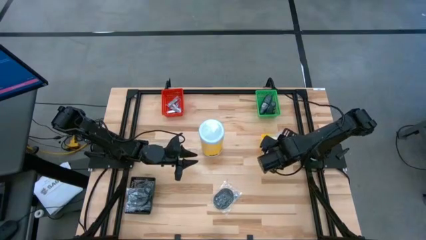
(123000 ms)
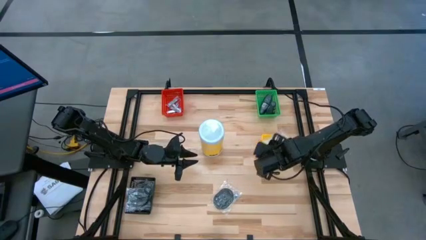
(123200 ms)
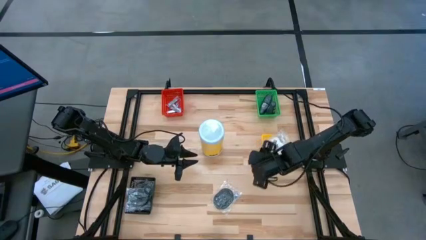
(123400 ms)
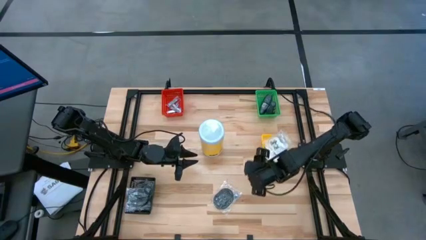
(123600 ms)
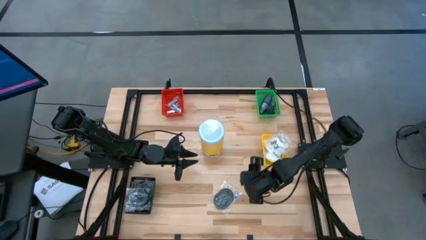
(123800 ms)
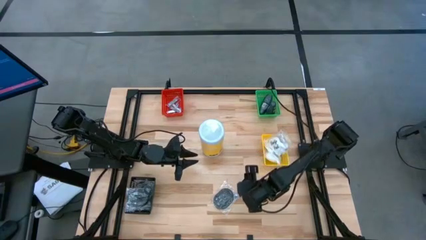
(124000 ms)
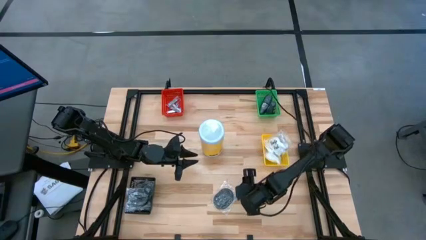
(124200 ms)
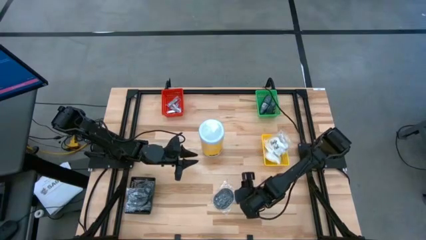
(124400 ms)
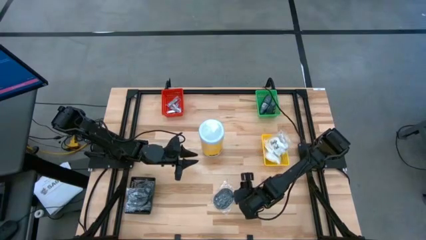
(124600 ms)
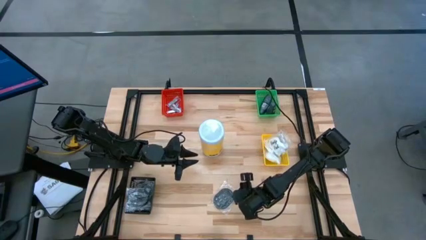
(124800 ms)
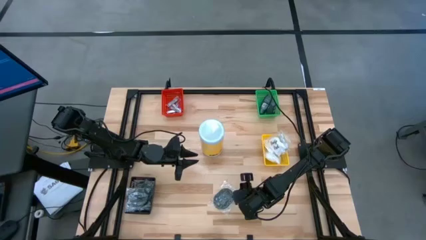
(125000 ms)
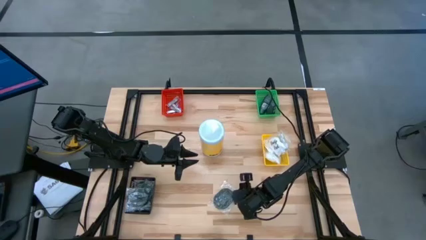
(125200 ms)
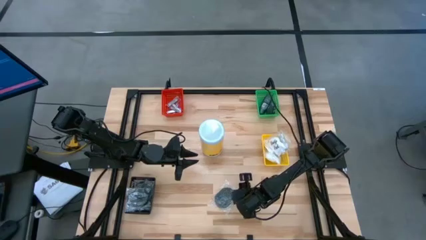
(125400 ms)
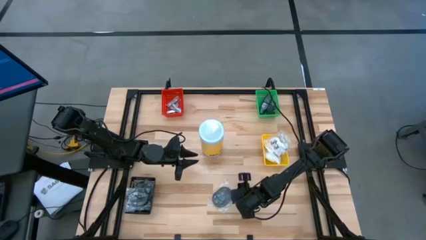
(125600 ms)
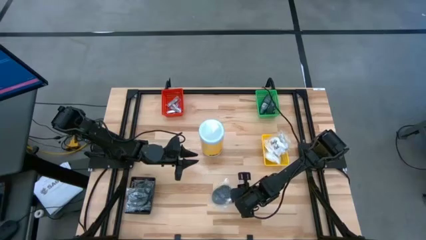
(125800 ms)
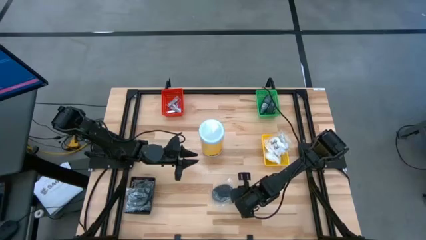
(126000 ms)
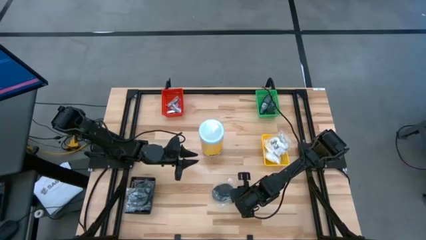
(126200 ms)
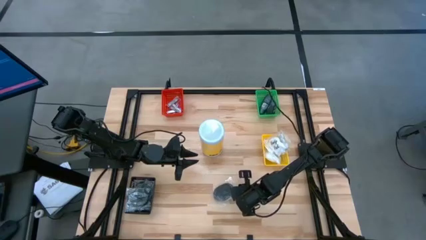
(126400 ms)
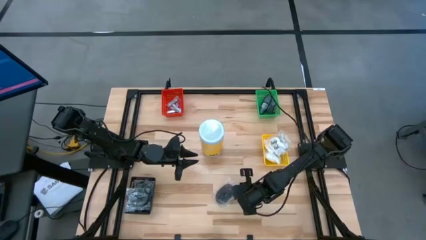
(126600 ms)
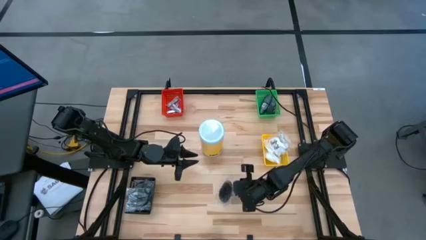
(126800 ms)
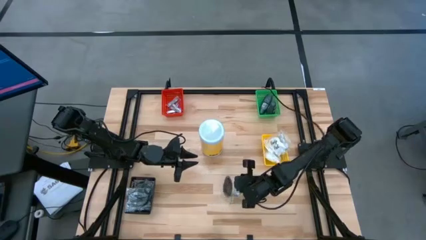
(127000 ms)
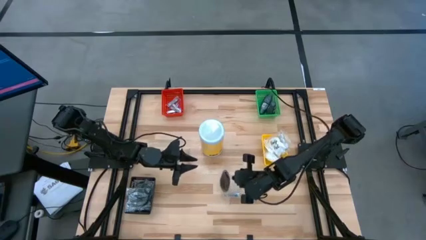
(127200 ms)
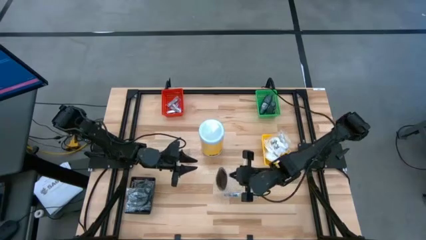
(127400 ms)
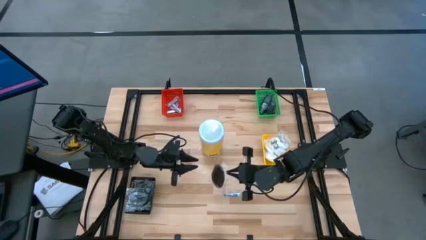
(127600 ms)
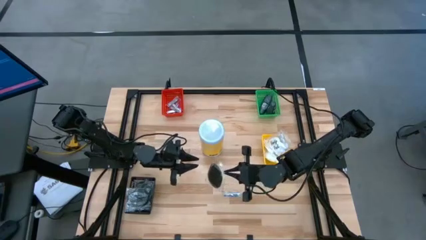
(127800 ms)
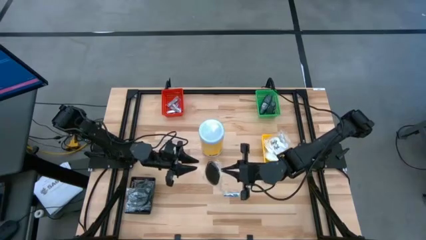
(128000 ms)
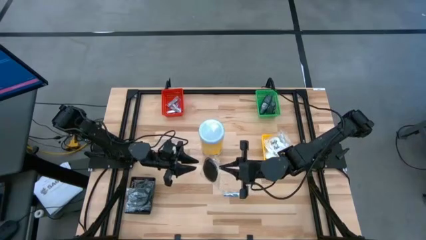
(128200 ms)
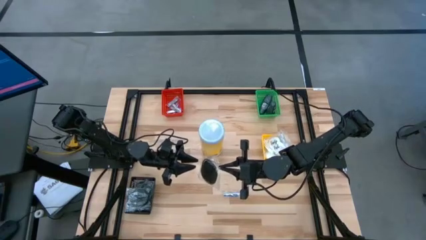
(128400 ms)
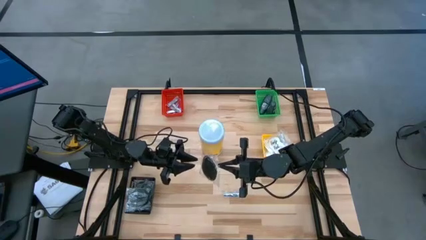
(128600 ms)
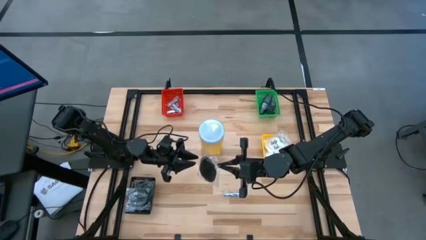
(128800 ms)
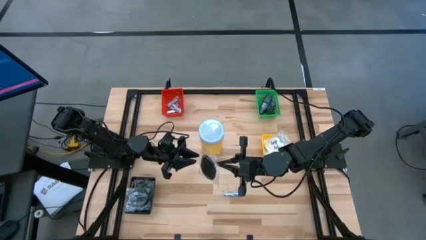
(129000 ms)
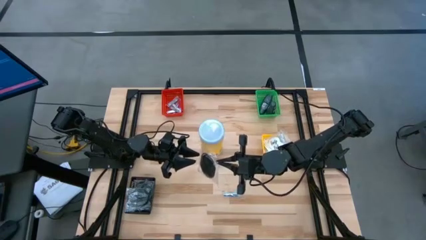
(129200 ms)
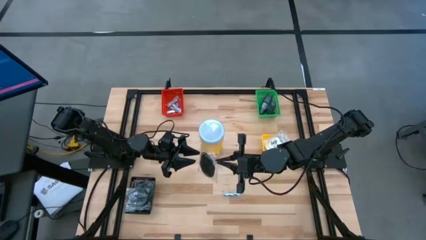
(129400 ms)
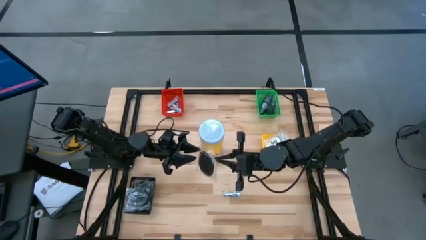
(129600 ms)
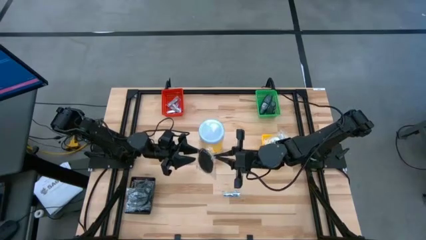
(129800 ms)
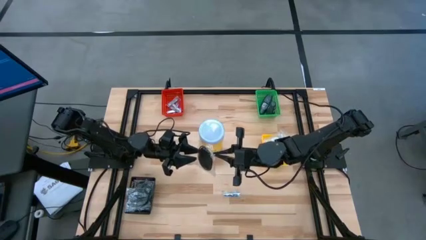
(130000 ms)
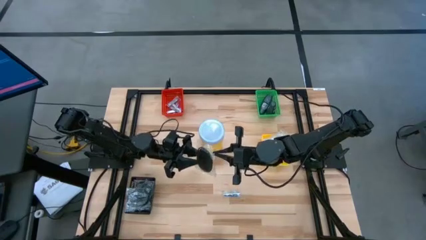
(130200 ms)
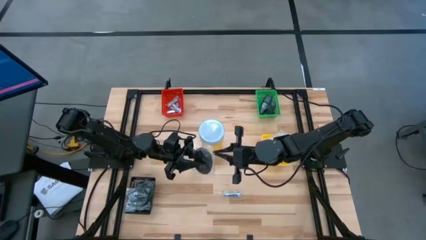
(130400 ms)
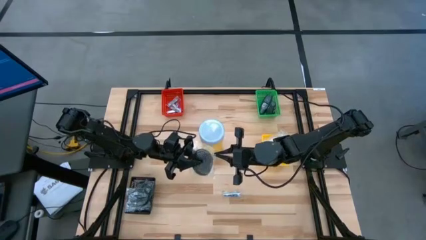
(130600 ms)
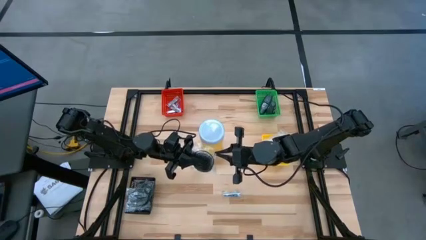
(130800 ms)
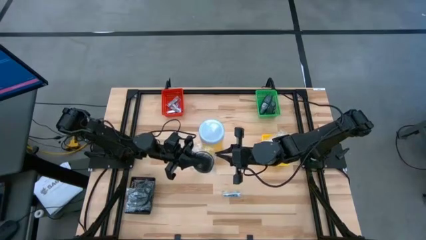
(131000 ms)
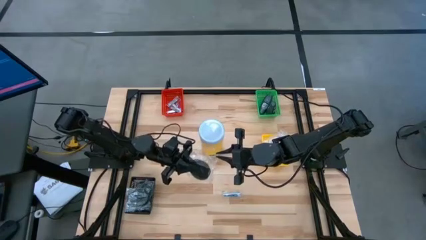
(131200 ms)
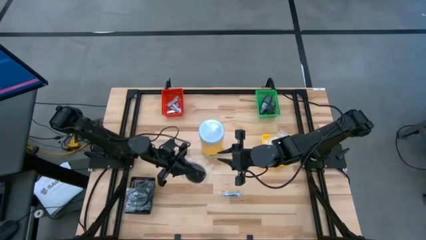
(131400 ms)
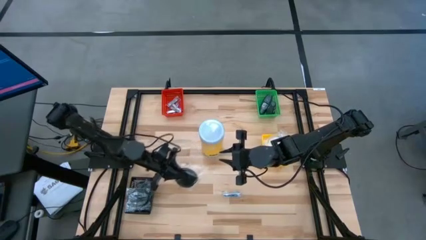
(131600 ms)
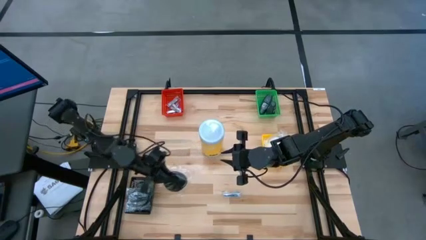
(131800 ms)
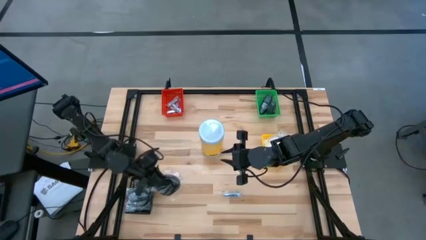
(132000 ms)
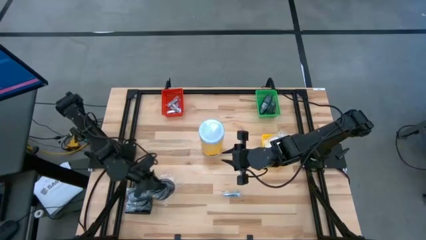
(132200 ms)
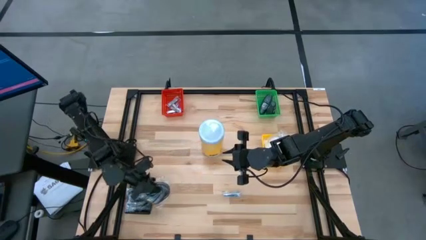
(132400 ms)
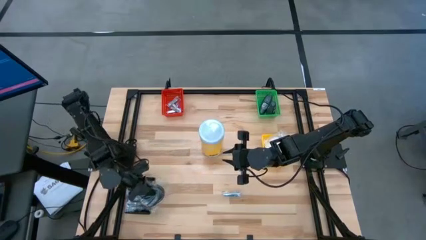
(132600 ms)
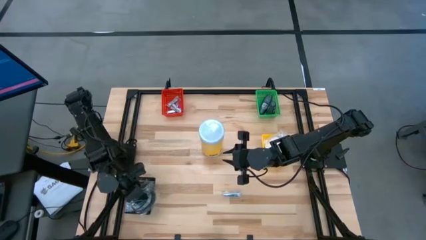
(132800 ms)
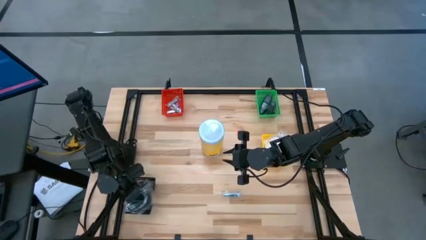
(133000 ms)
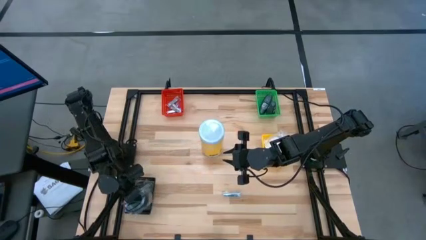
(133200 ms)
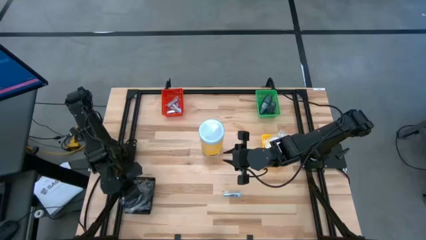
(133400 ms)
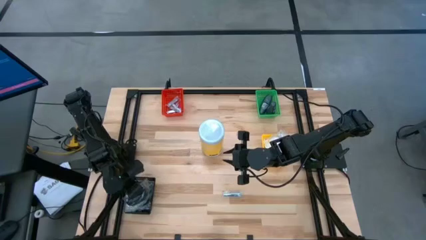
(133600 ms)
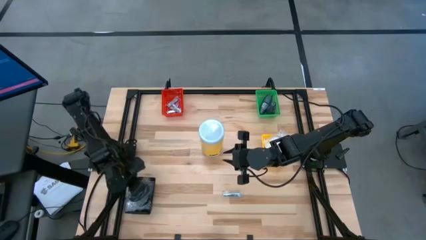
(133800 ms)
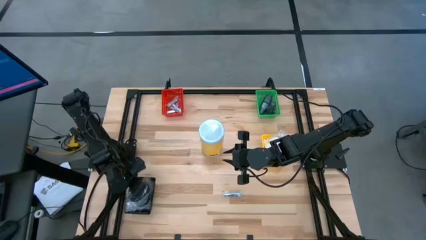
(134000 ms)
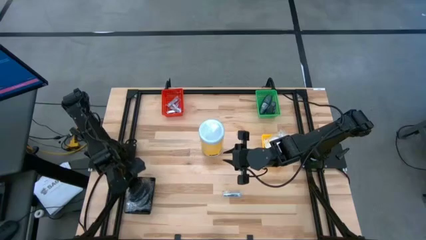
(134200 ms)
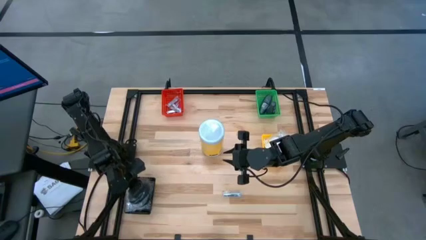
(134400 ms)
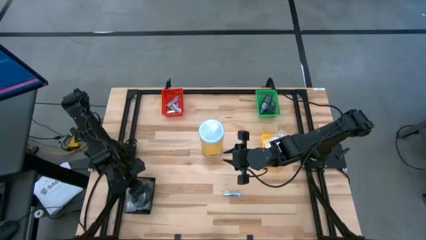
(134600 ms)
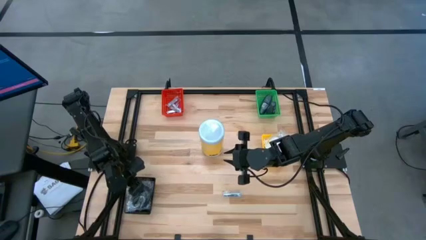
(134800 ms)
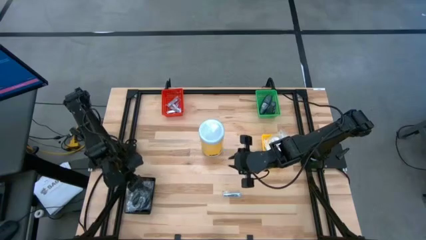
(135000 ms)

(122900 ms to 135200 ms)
Task: Pick & Place Travel size toiletries
Put the black hairbrush into the black bin
